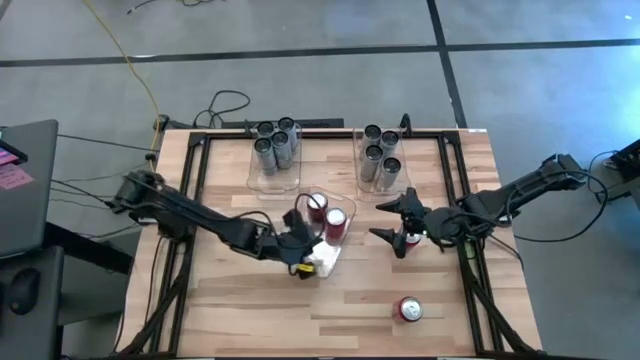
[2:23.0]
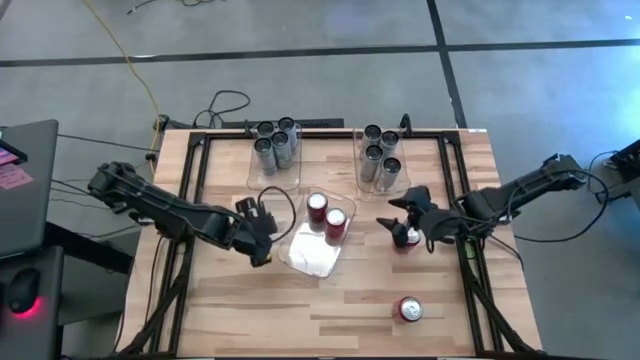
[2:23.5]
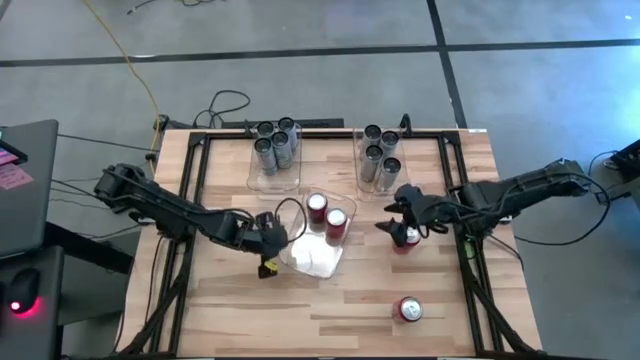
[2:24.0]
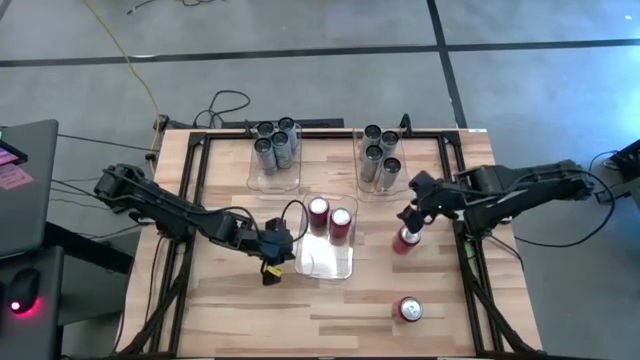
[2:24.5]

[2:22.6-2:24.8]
Task: Sort soda cans
Adjust the center transparent bin

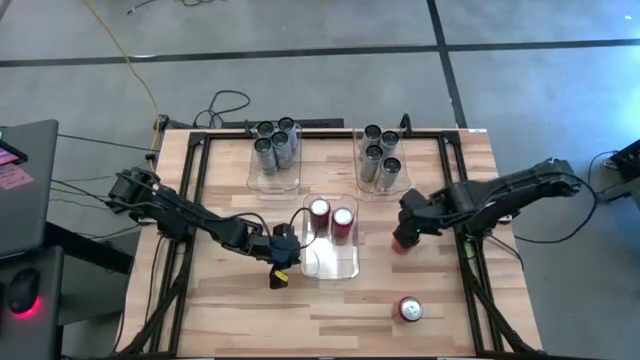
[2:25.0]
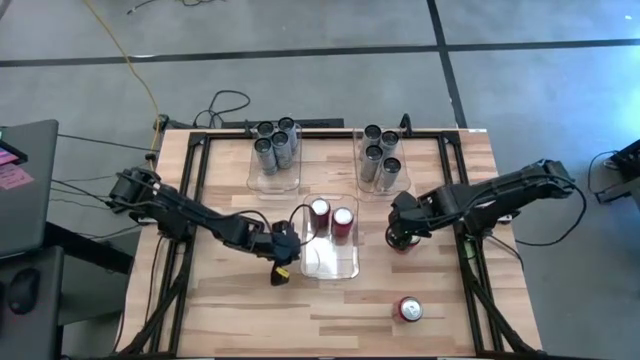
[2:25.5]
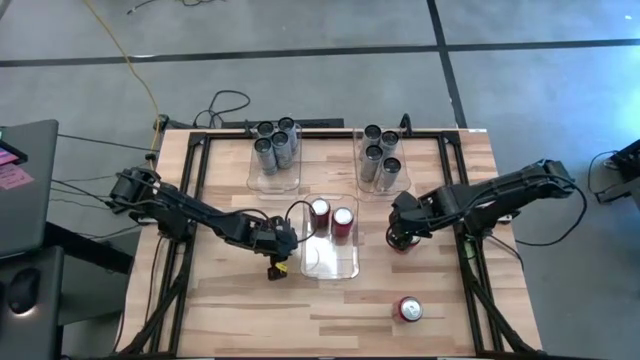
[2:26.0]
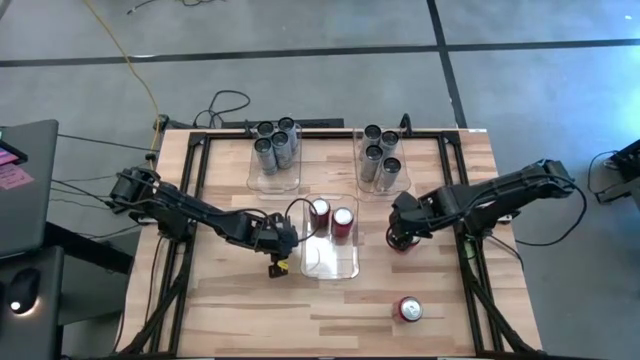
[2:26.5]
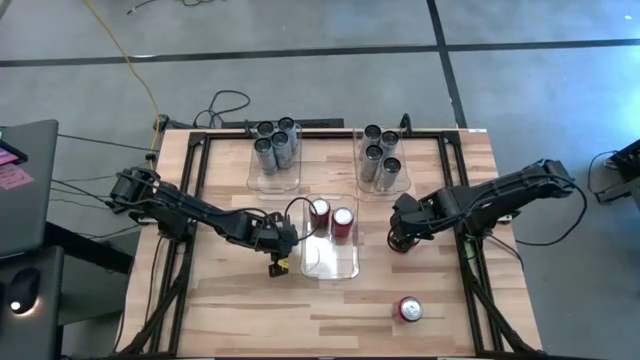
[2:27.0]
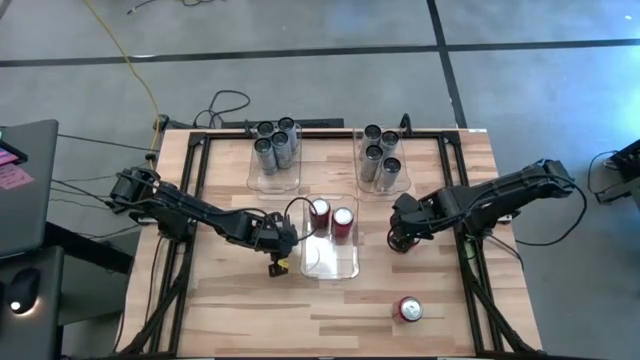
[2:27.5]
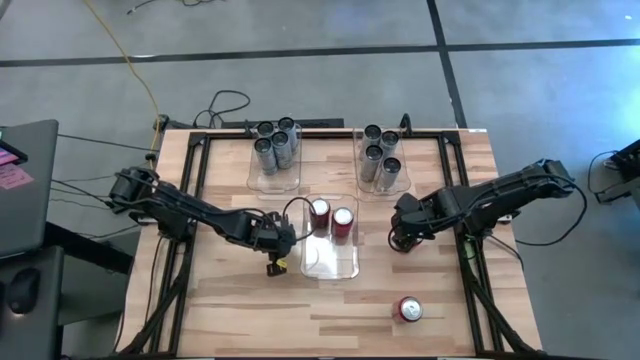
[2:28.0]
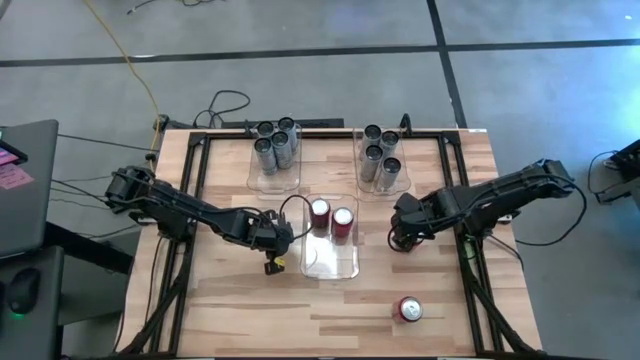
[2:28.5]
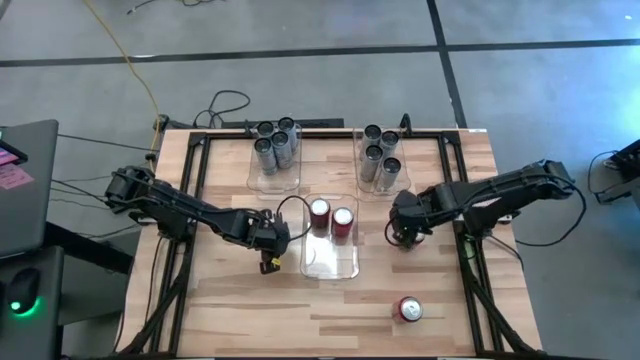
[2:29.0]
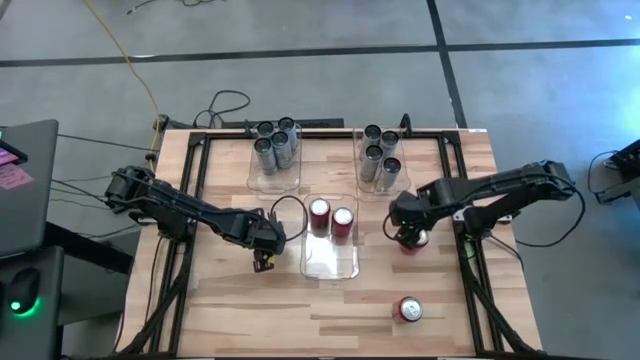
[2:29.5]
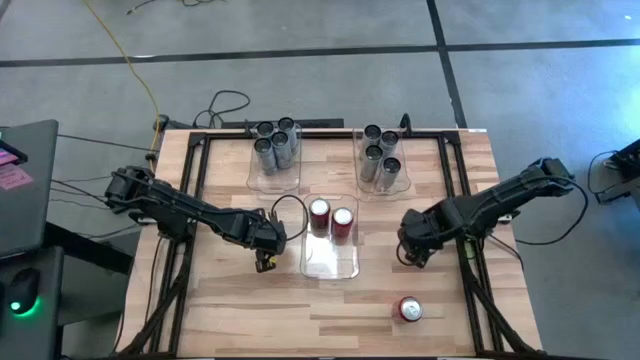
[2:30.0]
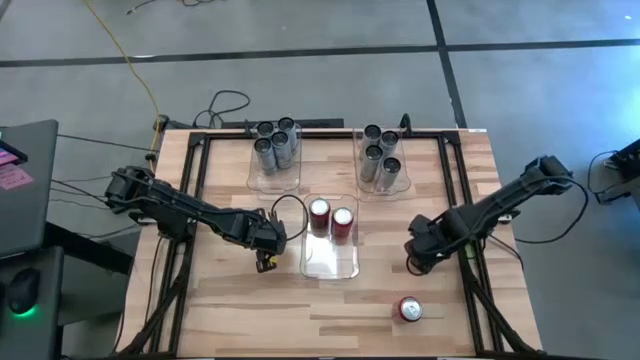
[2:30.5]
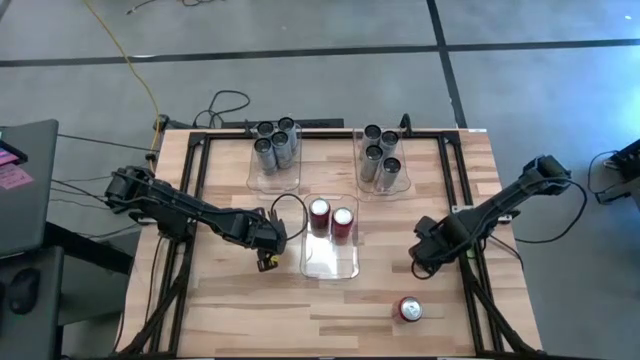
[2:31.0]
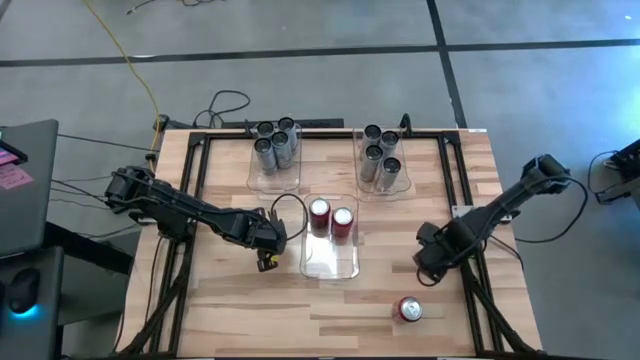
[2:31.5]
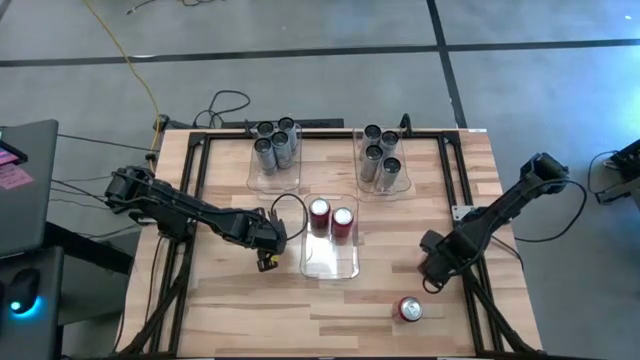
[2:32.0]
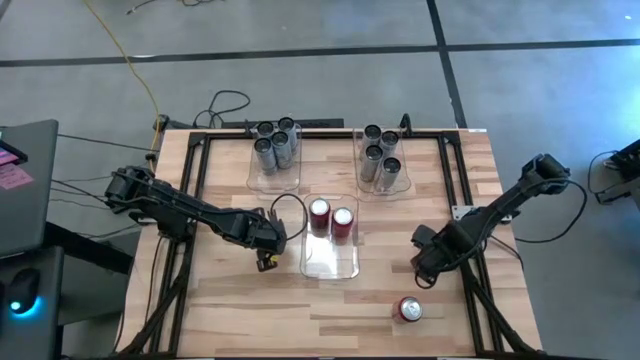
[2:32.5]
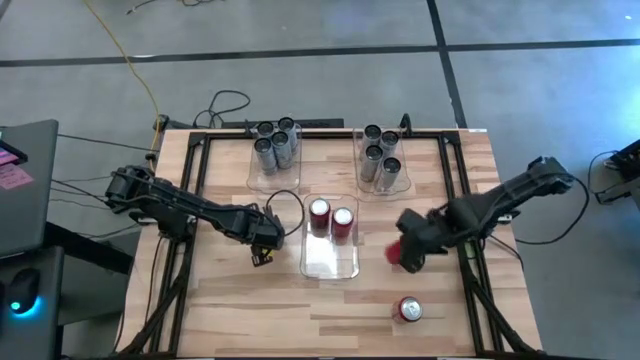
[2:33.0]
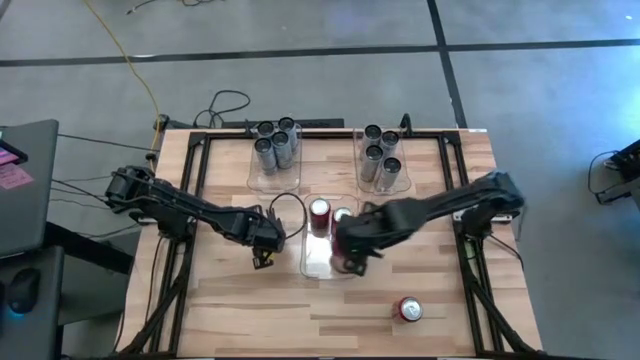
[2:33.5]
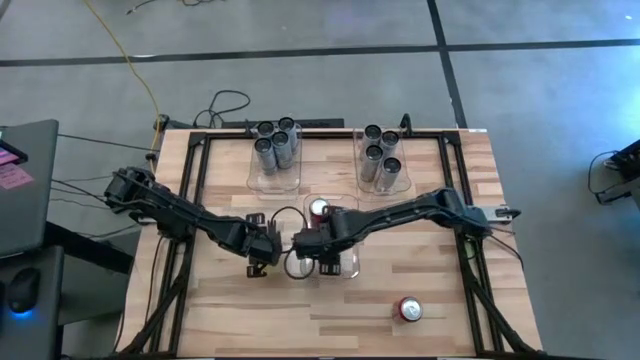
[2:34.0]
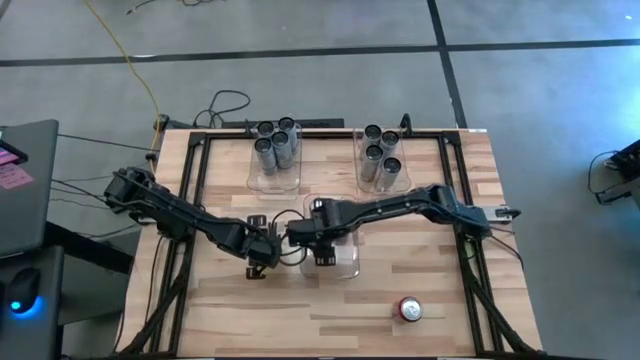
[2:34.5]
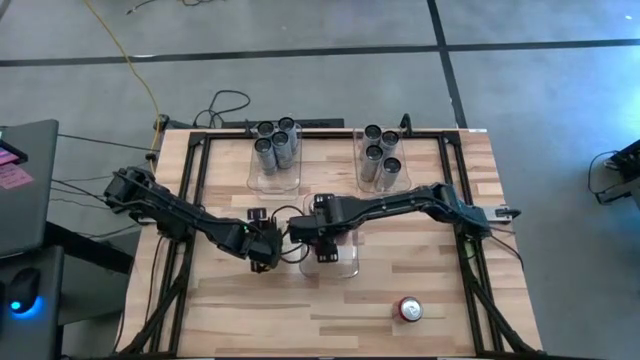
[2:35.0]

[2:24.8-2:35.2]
Put the red soda can into the center transparent bin

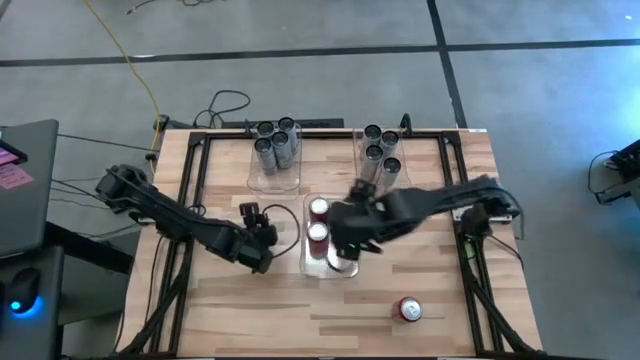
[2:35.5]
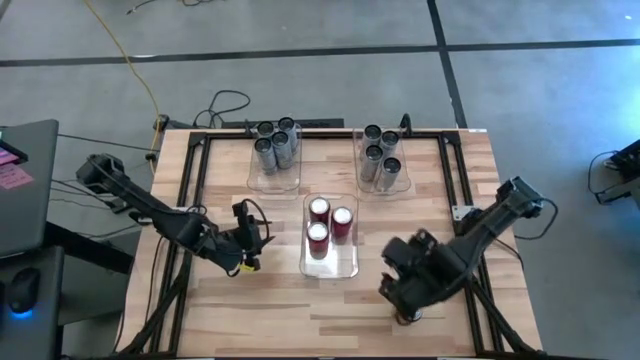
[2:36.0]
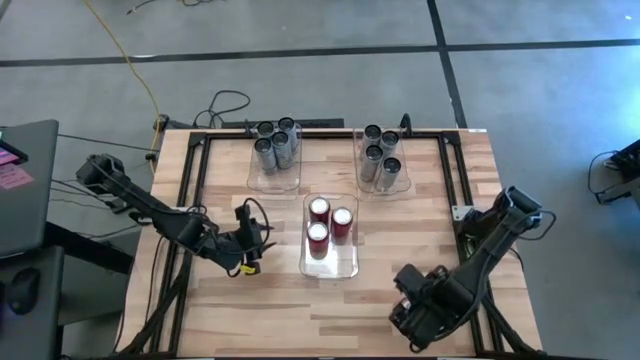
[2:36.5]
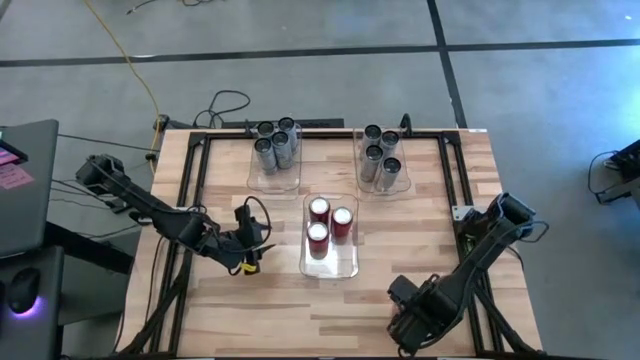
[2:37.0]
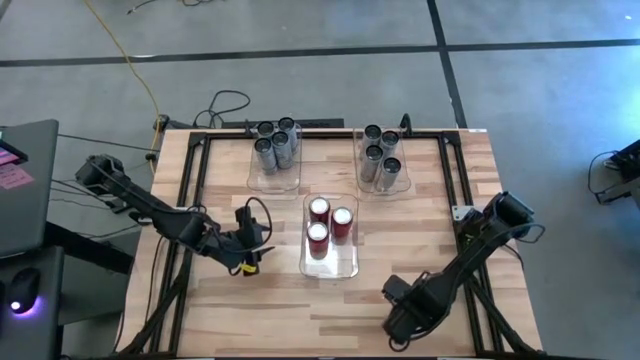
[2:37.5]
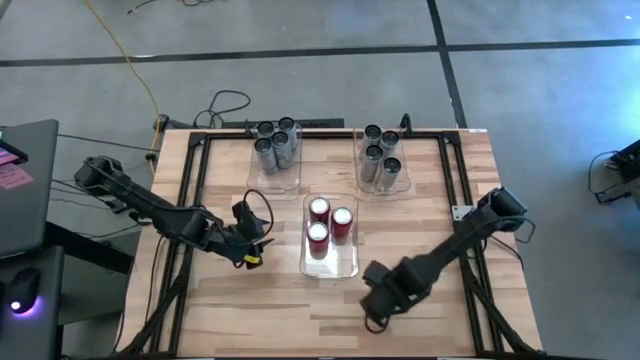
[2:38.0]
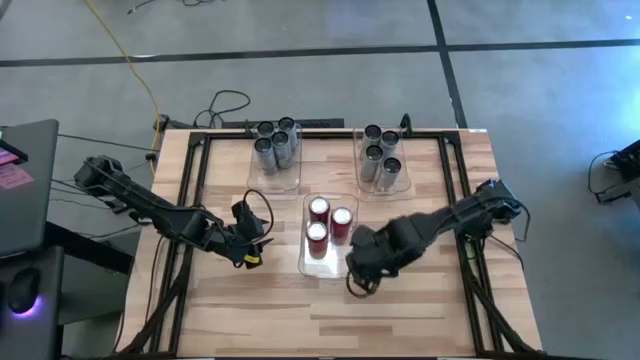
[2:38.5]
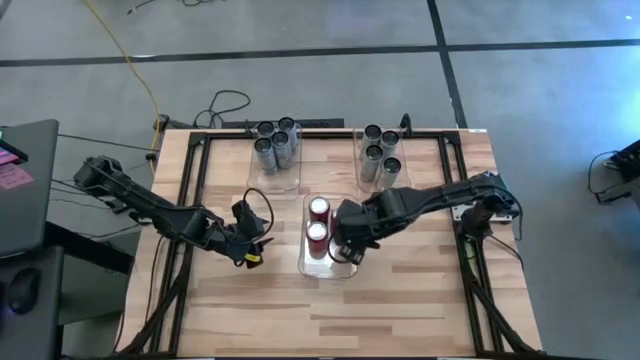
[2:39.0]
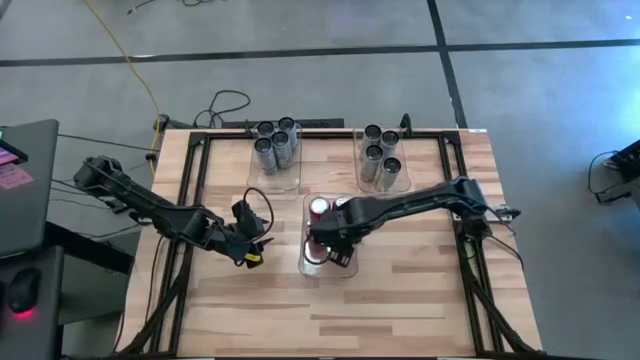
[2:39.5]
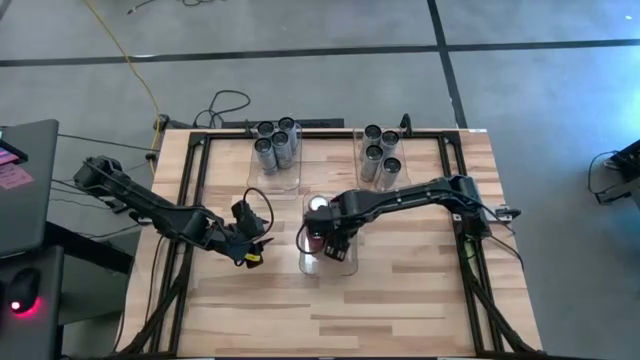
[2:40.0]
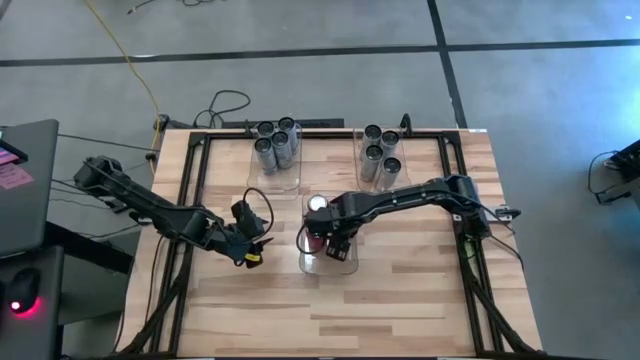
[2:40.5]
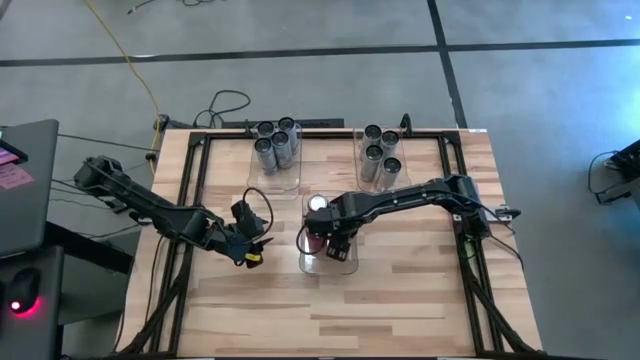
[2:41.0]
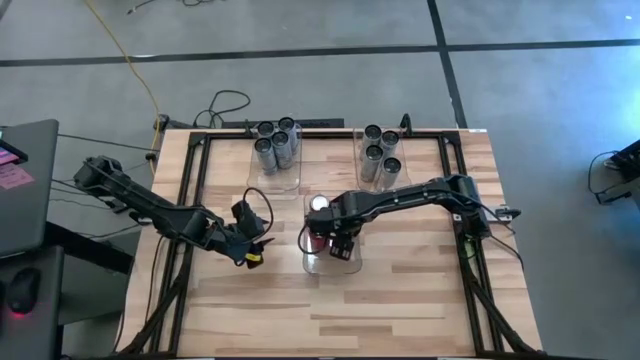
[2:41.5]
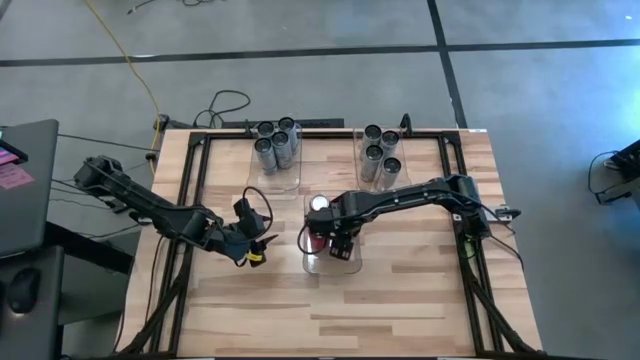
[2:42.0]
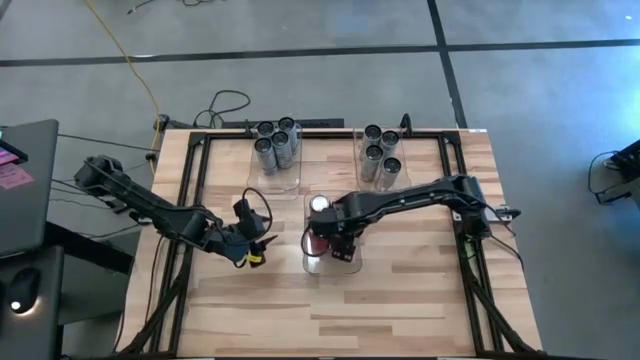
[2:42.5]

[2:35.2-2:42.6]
Put the red soda can into the center transparent bin

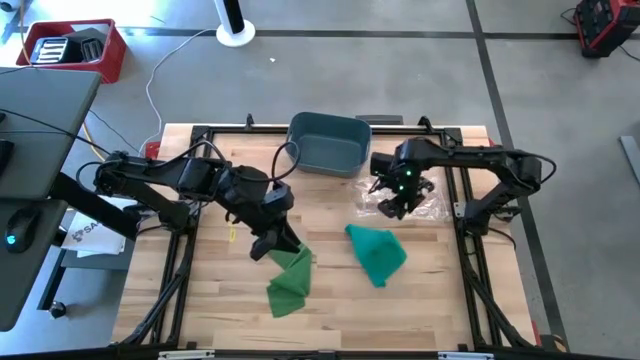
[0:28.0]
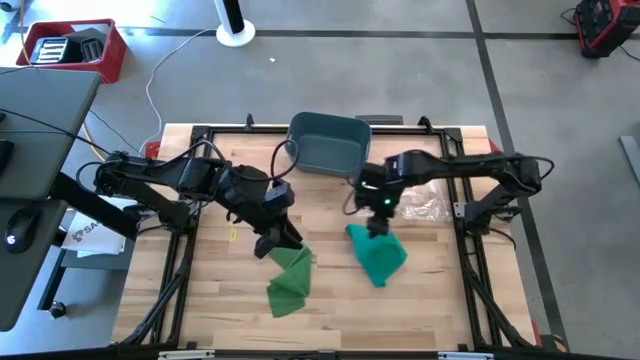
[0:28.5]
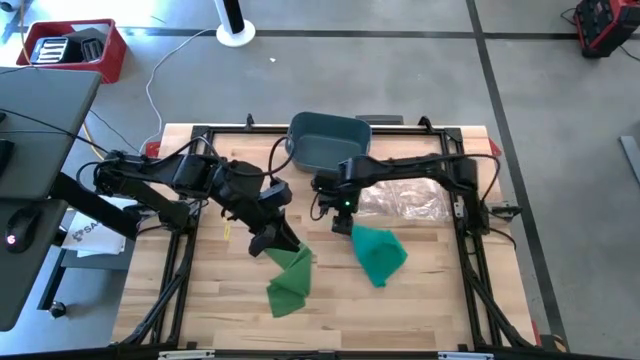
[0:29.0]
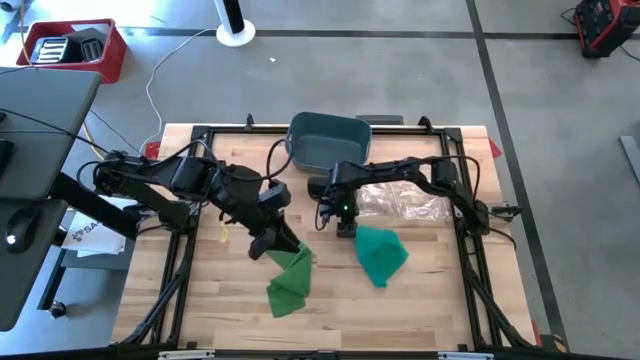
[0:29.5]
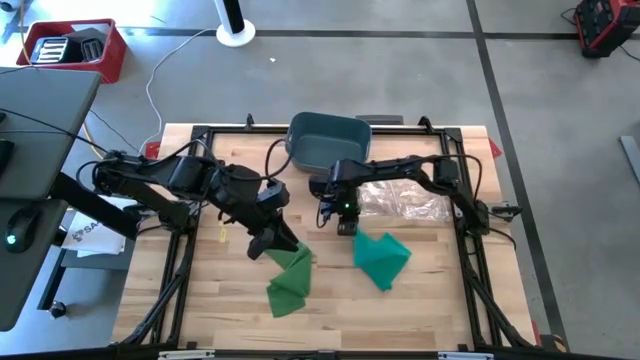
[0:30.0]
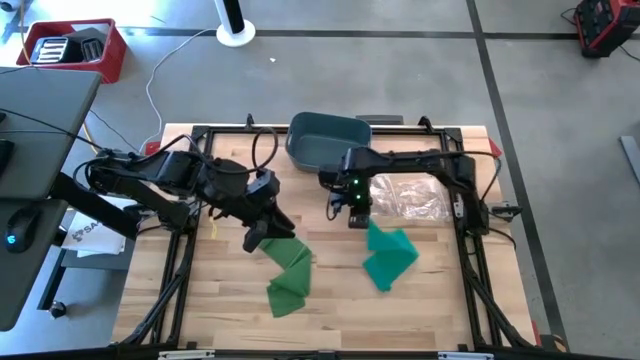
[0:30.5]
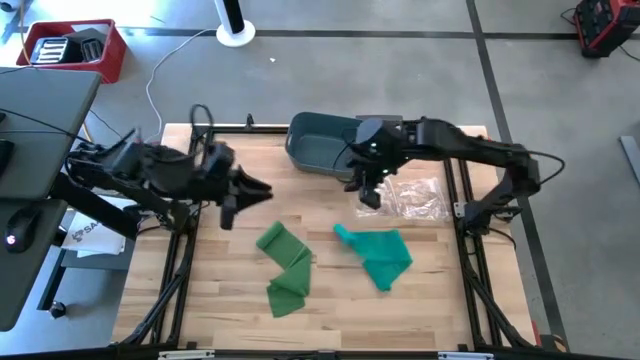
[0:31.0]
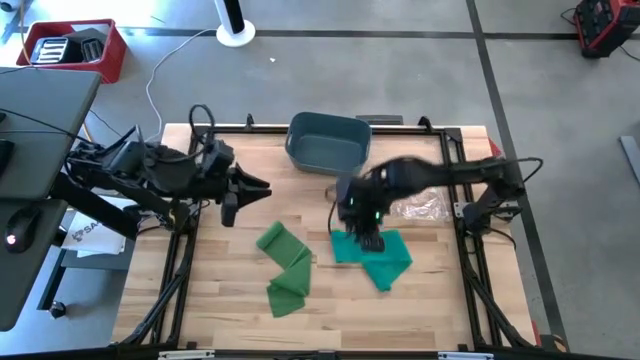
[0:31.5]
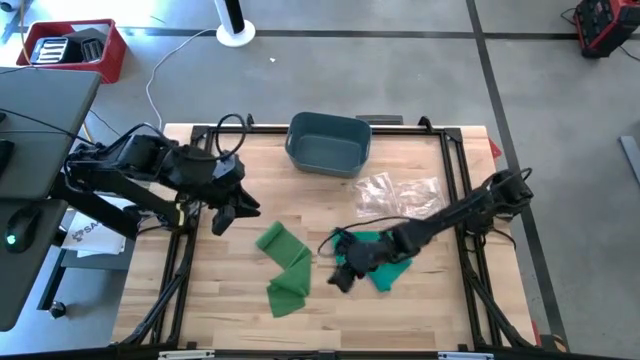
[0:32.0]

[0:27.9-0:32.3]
Task: Roll bandage
Roll the blue bandage
